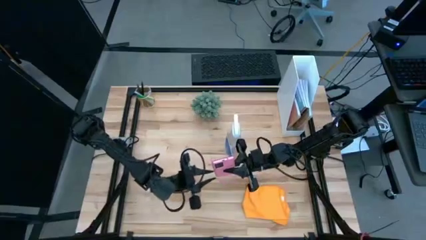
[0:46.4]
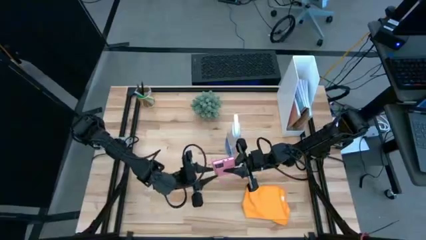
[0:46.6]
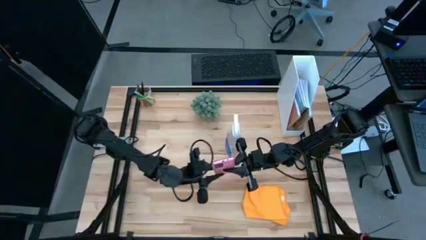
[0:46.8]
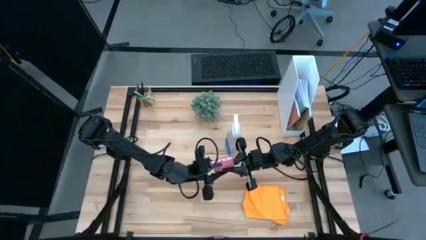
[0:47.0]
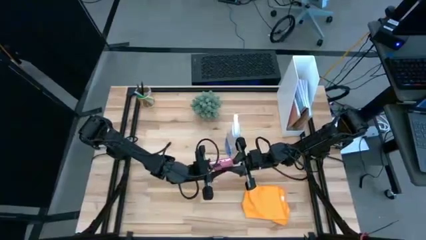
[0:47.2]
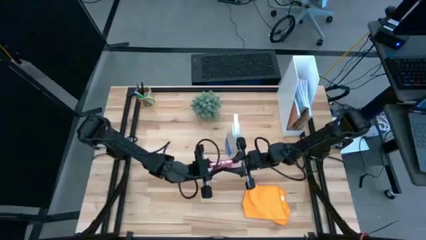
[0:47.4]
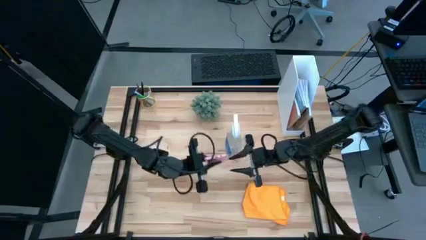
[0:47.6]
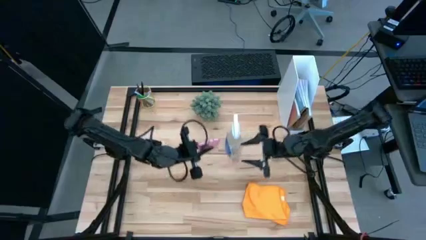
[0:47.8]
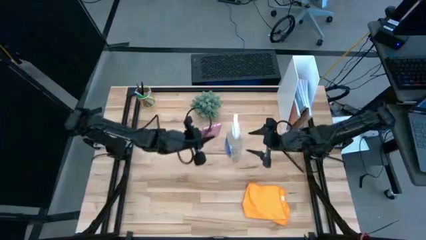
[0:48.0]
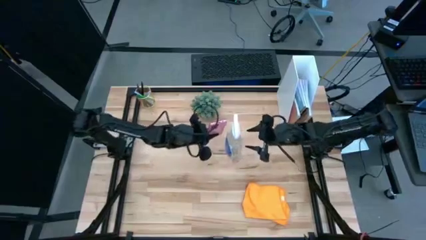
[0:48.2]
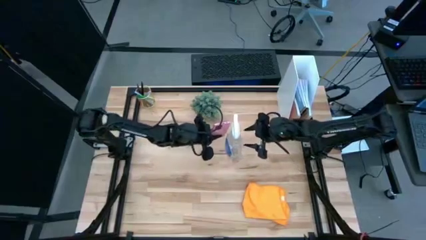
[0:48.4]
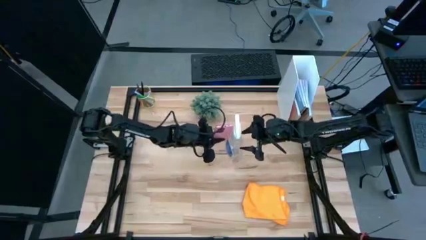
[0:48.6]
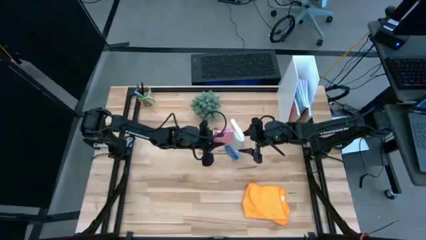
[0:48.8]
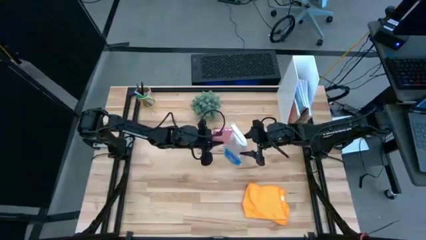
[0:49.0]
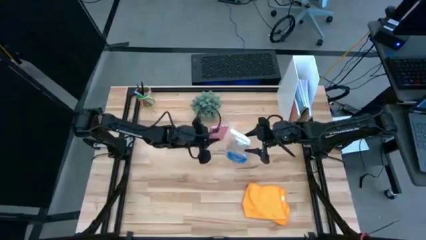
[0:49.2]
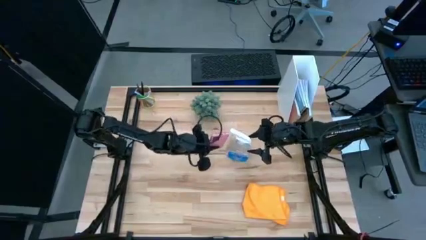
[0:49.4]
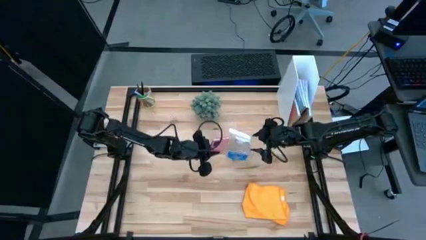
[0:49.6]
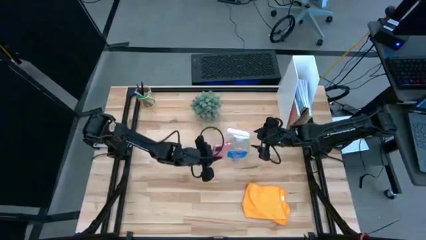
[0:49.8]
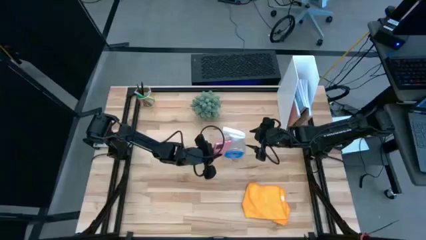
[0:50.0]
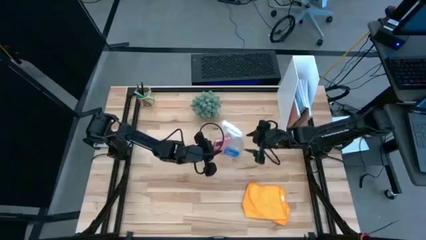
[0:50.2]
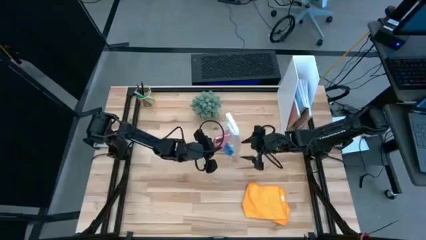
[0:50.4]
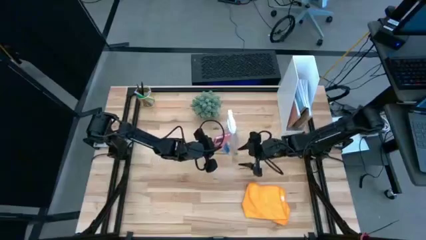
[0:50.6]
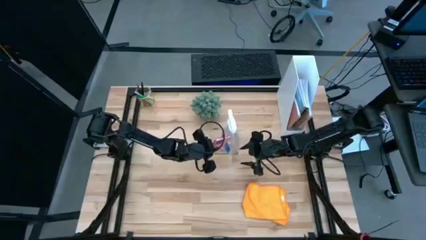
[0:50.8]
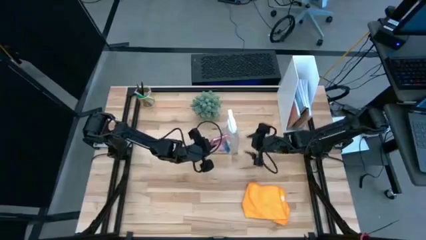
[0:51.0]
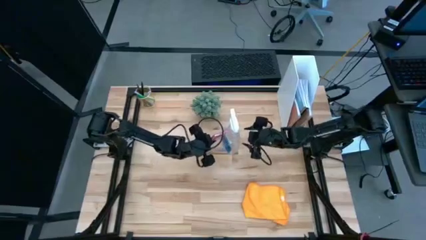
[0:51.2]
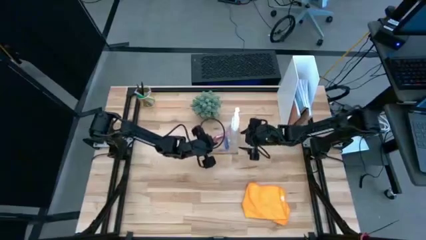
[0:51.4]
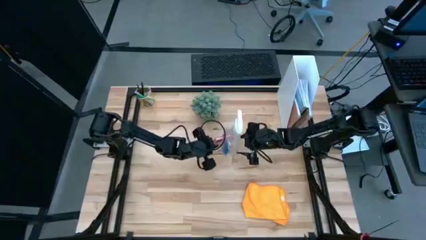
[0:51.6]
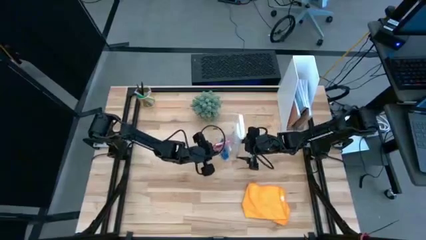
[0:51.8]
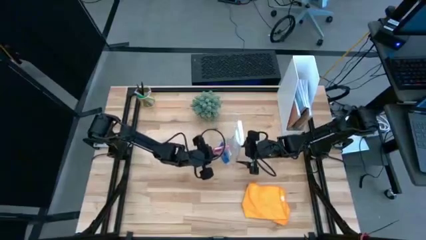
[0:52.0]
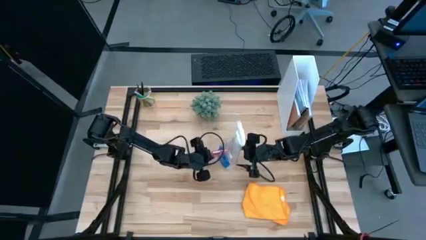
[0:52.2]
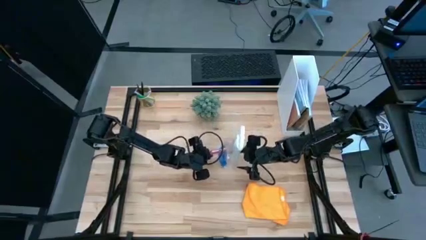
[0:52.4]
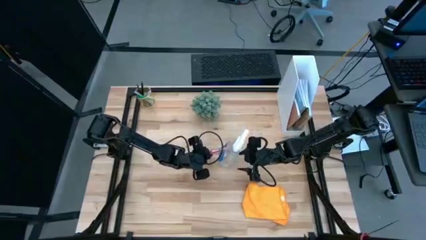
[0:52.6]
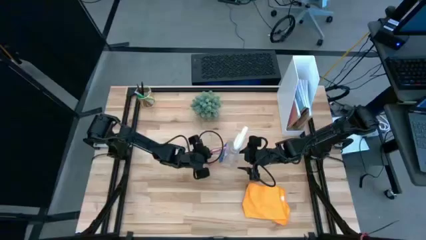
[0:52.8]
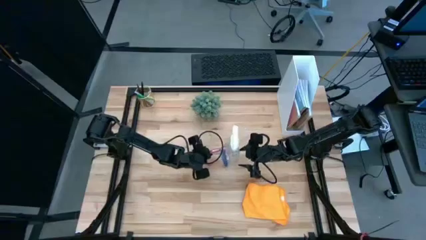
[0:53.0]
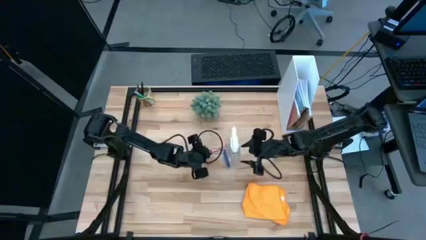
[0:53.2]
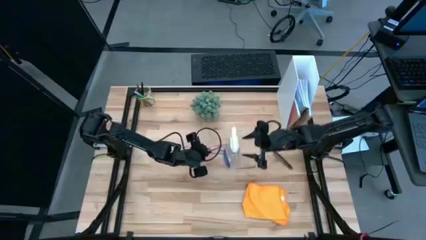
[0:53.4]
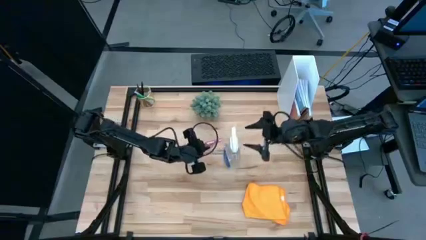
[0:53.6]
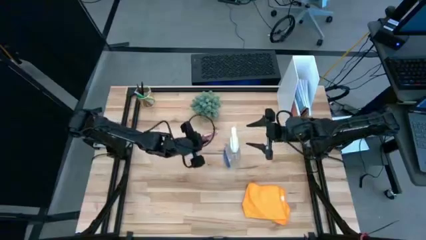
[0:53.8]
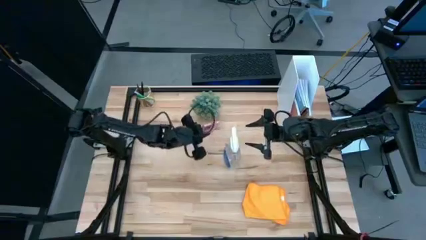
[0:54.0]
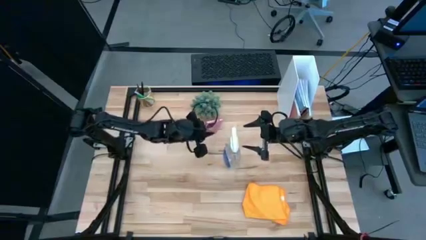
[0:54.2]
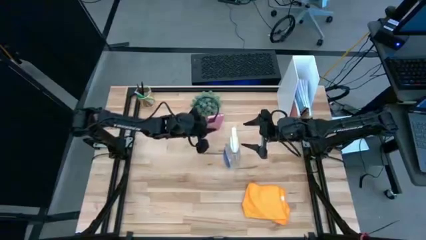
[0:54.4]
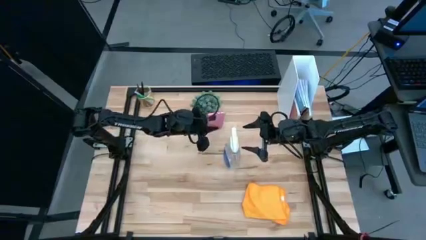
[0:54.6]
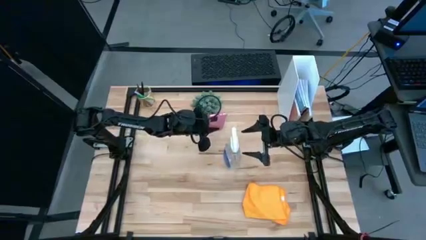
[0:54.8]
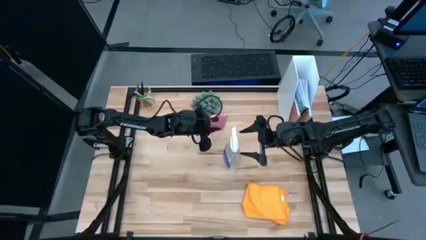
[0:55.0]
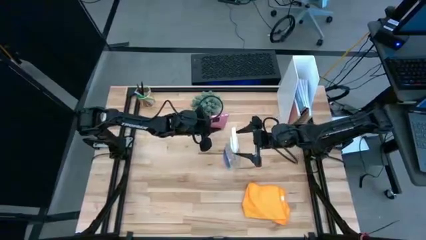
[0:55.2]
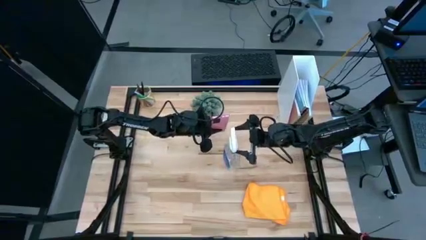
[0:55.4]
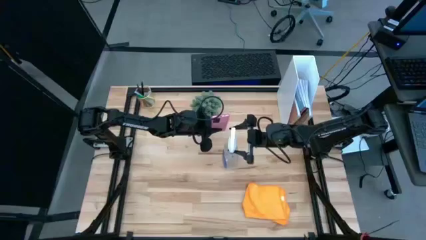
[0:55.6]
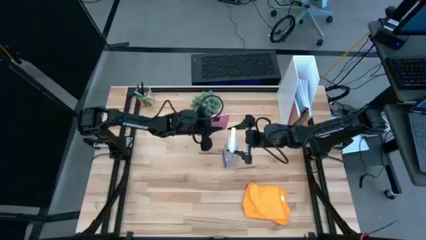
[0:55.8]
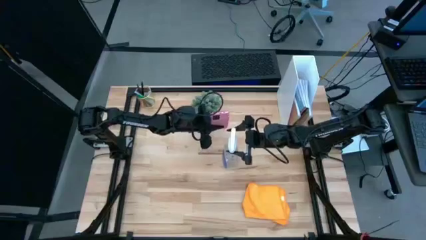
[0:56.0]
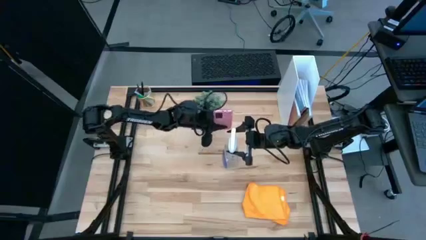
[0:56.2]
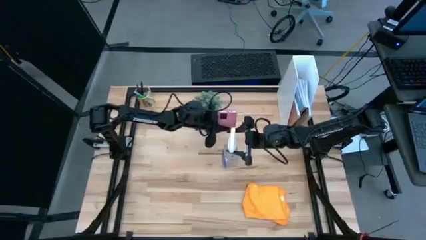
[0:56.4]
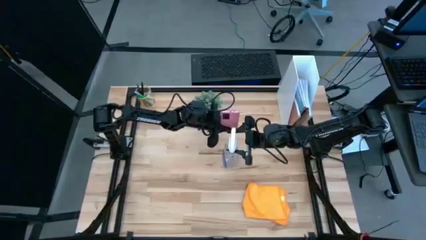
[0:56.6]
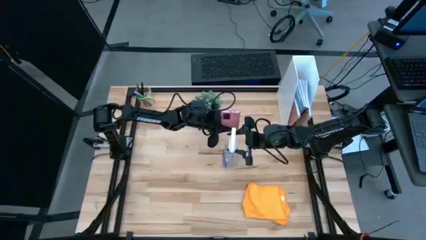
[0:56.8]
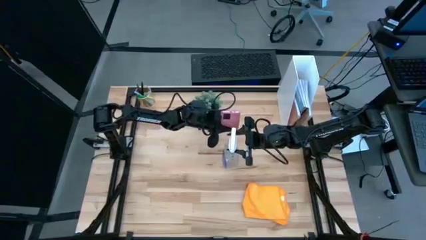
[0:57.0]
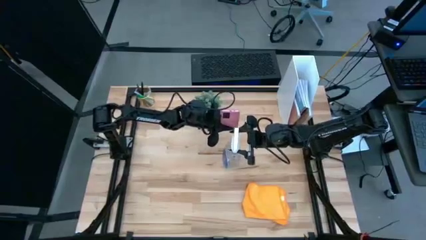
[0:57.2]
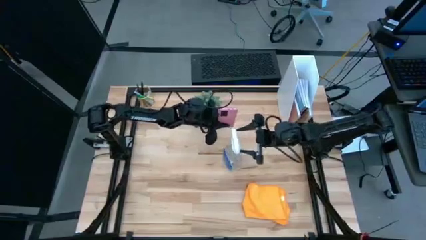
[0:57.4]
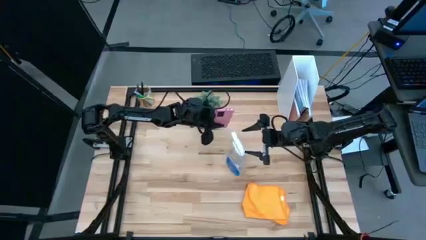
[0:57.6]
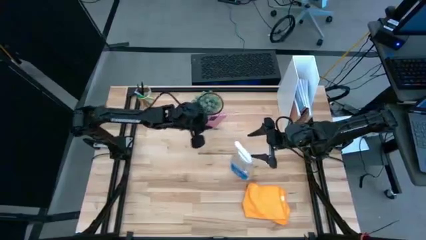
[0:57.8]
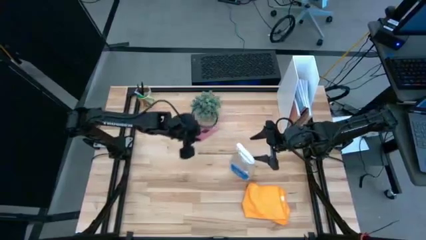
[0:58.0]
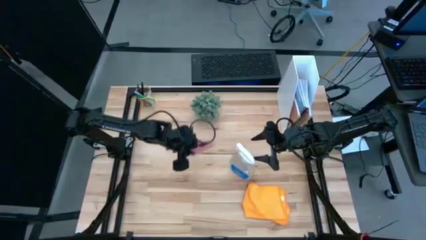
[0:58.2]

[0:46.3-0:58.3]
Task: Apply microfiber cloth
Spray cleaner from the bottle onto the cellphone

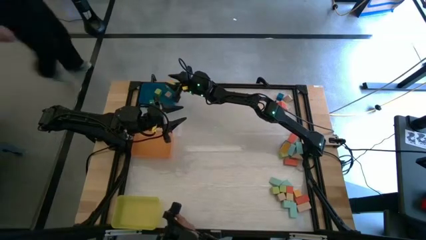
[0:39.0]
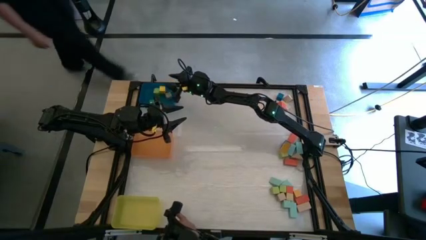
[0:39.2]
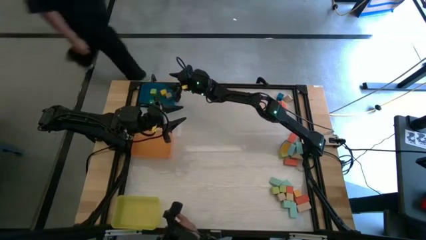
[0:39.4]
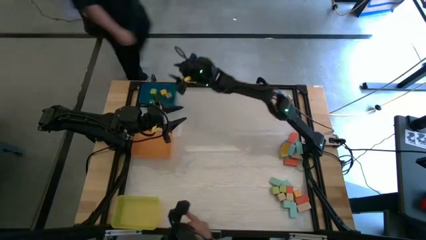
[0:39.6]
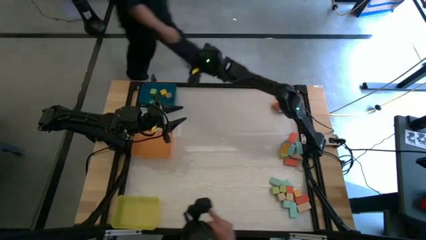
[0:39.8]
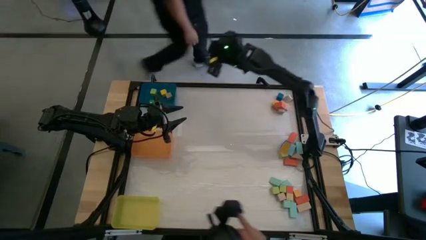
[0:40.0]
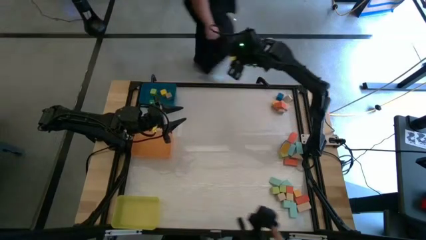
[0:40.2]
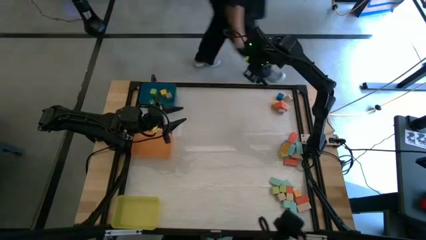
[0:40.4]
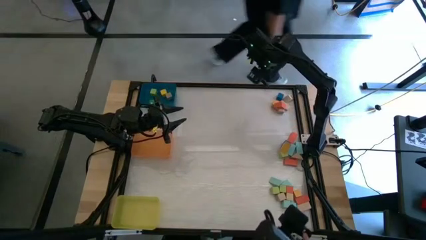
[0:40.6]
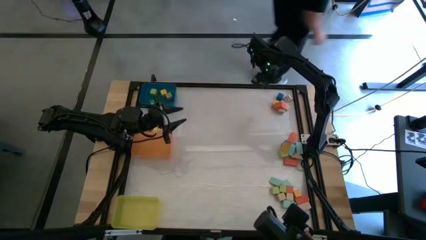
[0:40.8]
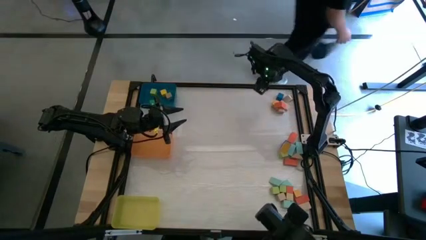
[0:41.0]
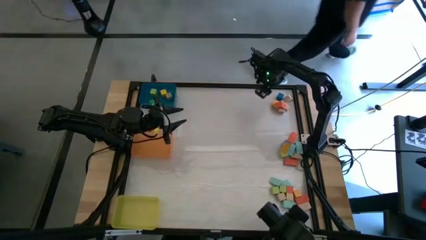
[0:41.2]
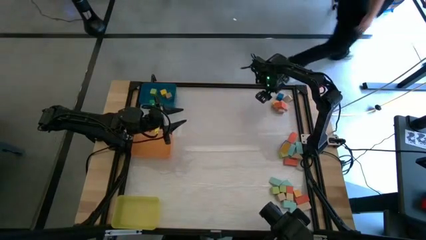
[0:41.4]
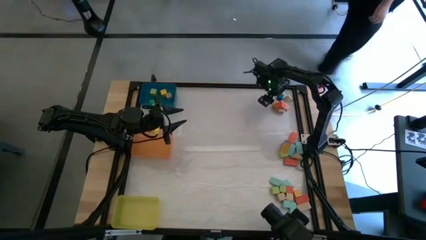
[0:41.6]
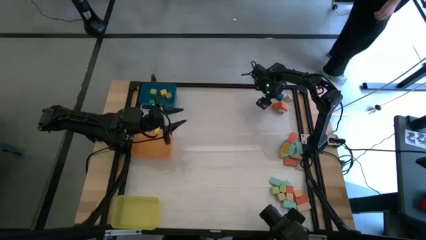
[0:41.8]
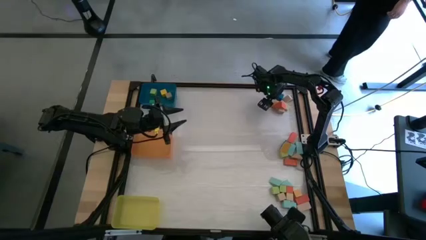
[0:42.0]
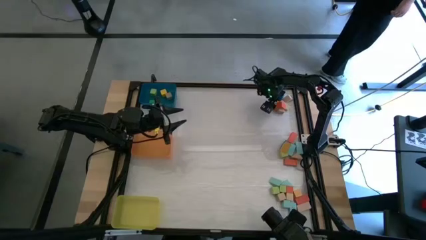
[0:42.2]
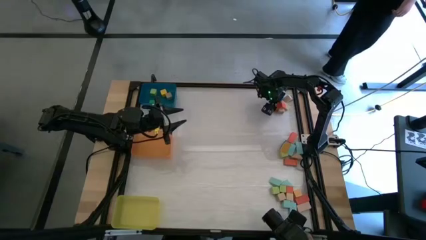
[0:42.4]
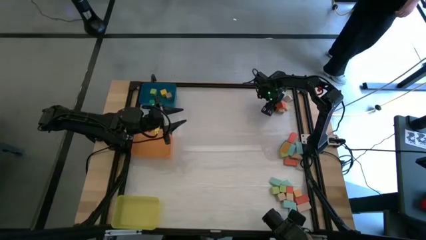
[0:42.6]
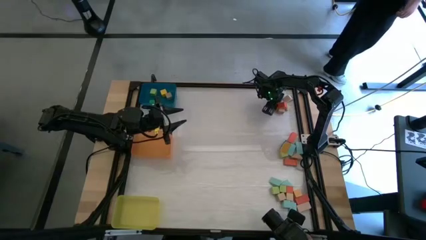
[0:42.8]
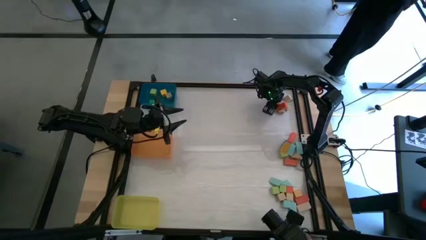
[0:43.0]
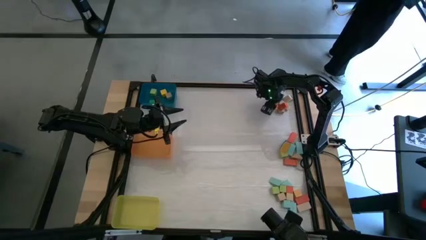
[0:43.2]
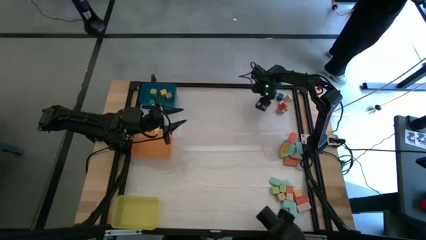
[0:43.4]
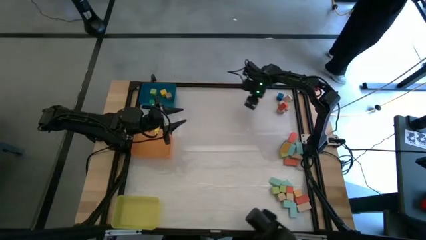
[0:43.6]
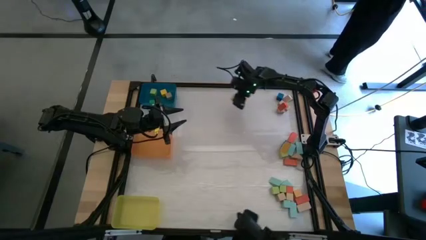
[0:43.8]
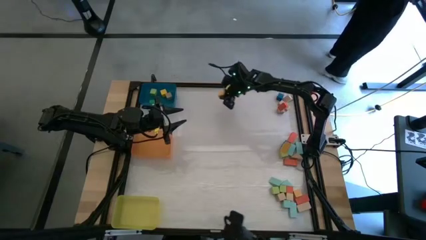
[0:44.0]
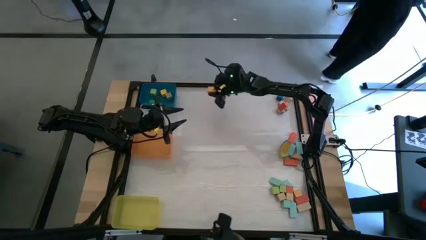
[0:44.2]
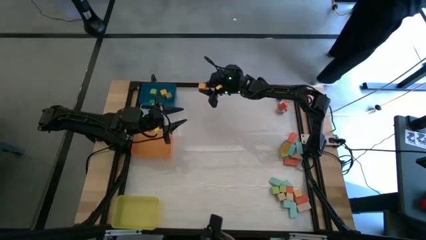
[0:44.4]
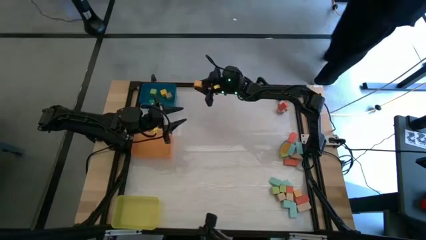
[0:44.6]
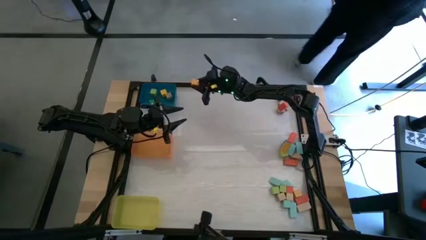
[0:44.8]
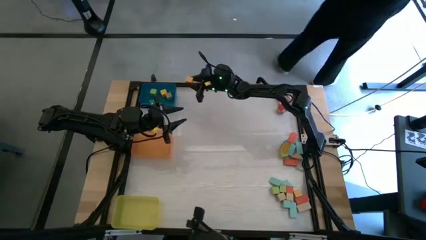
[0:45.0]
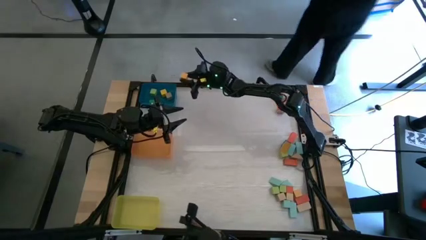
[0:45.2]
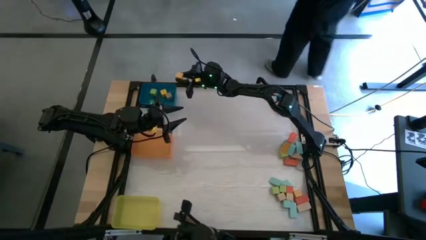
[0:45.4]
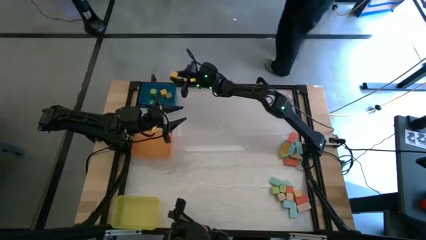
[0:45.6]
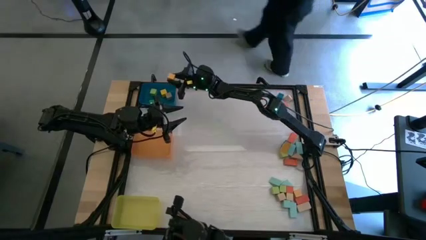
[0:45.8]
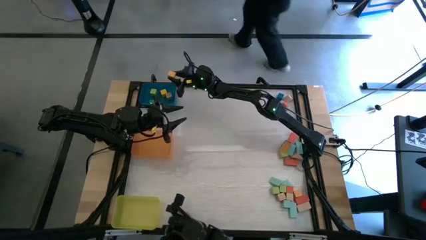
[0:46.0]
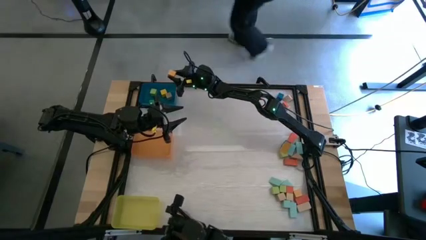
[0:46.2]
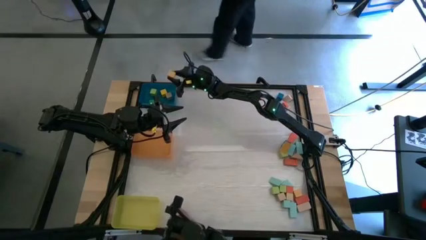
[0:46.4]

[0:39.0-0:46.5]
Task: Sort blocks by size
Put the yellow cube block into the blue bin
